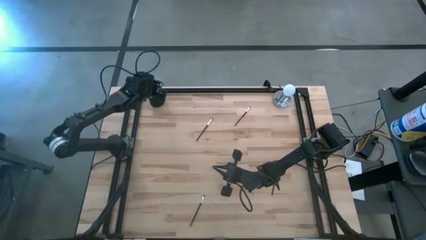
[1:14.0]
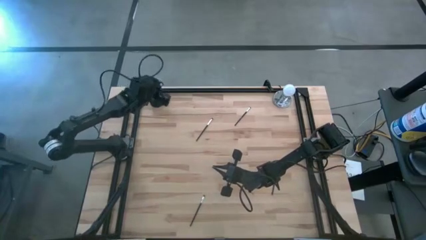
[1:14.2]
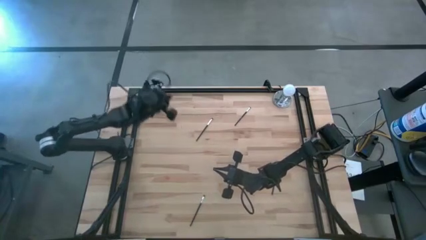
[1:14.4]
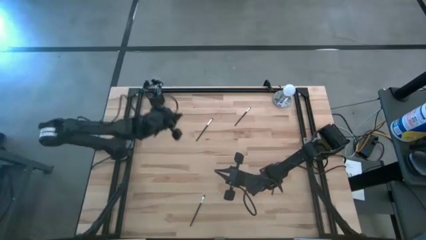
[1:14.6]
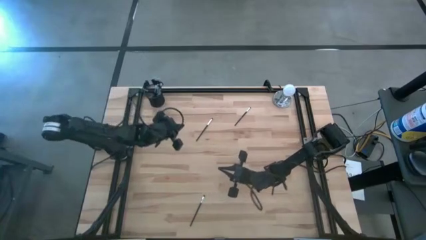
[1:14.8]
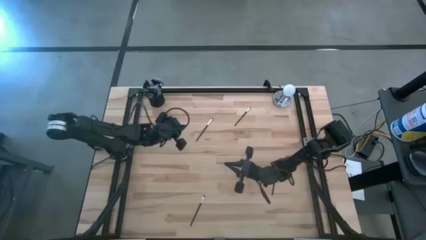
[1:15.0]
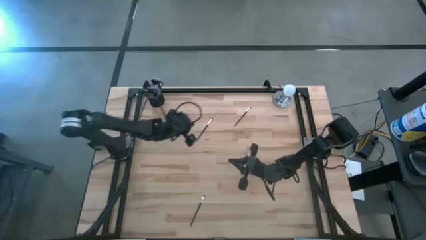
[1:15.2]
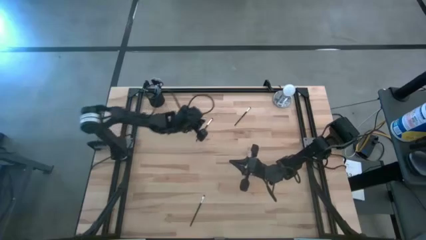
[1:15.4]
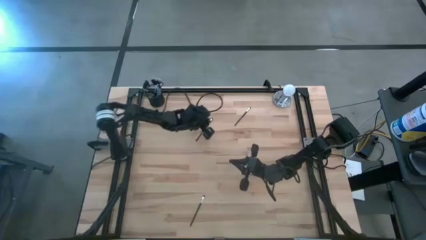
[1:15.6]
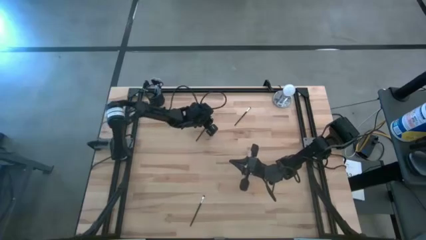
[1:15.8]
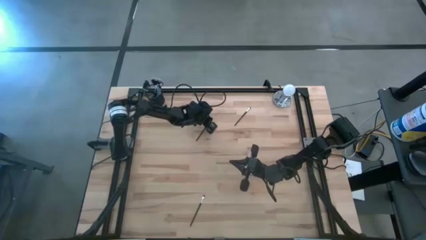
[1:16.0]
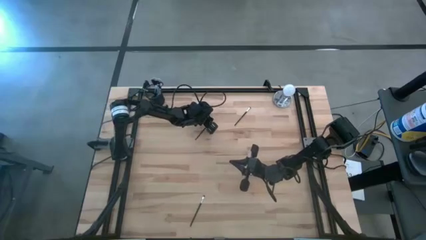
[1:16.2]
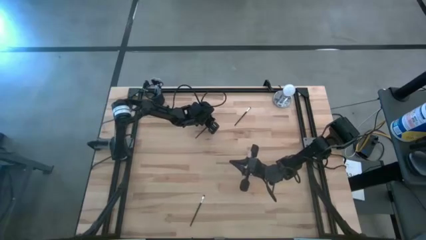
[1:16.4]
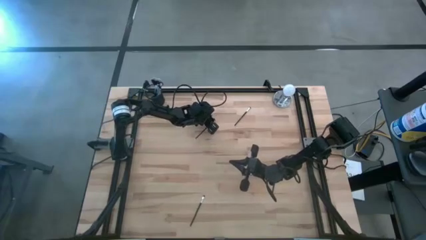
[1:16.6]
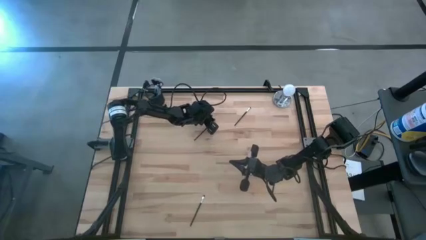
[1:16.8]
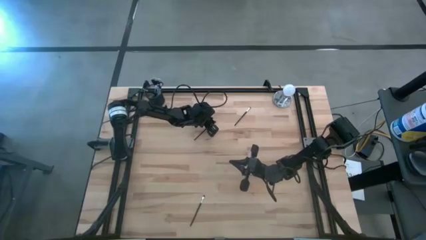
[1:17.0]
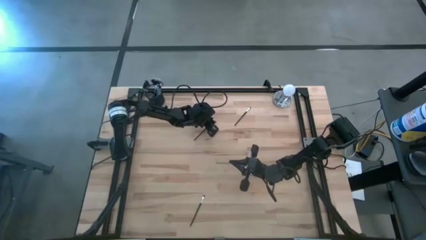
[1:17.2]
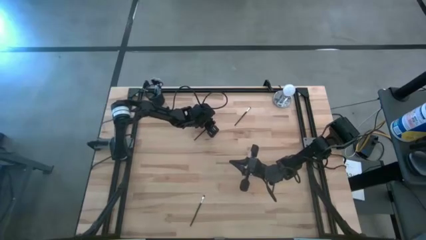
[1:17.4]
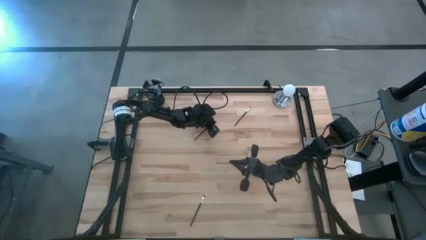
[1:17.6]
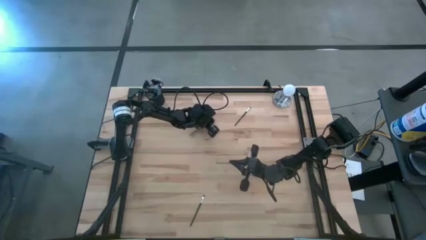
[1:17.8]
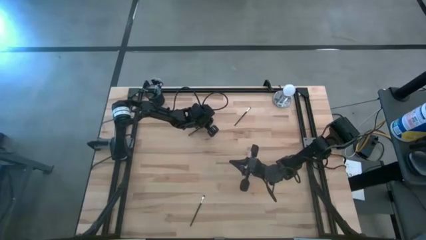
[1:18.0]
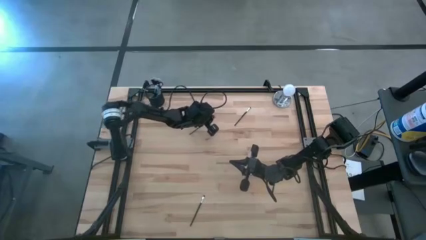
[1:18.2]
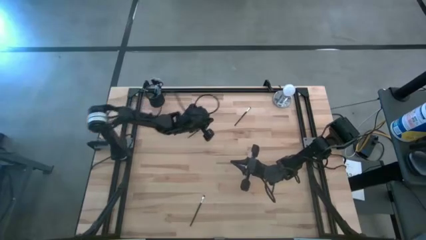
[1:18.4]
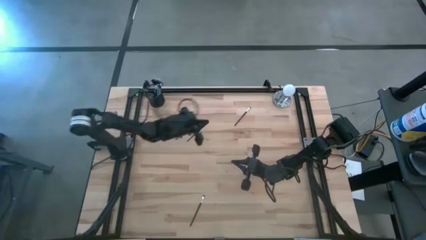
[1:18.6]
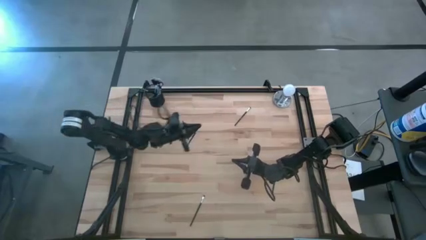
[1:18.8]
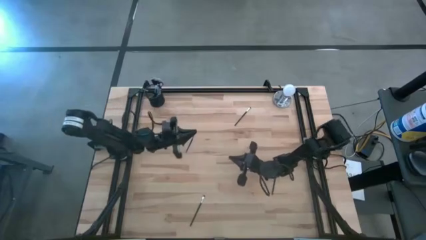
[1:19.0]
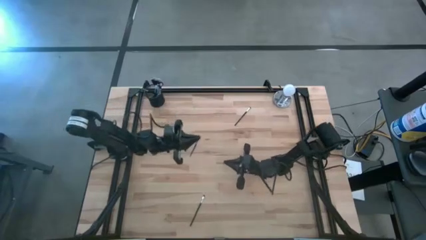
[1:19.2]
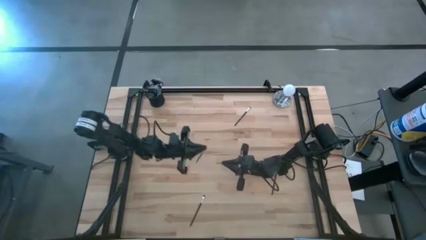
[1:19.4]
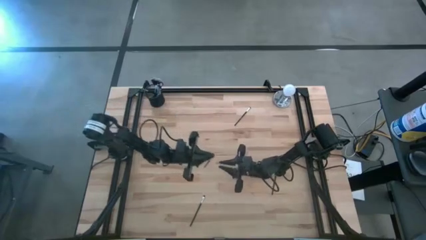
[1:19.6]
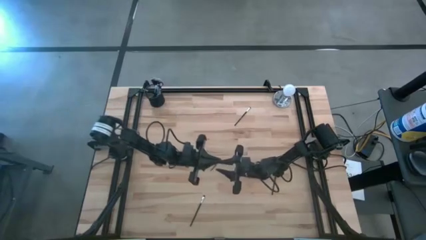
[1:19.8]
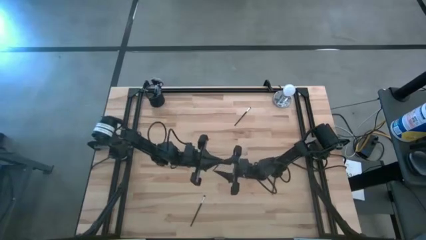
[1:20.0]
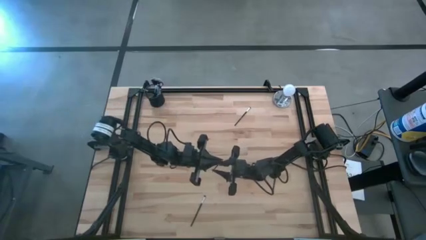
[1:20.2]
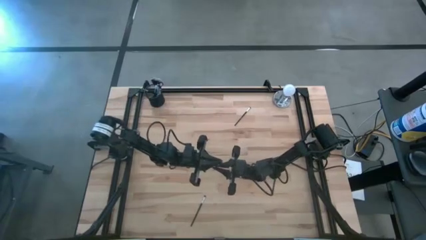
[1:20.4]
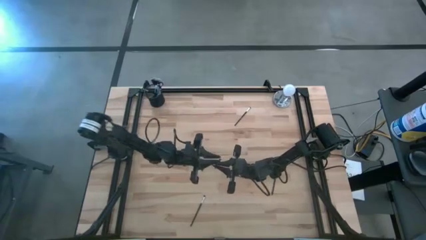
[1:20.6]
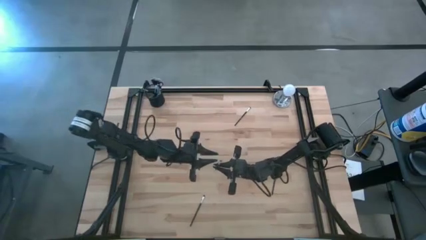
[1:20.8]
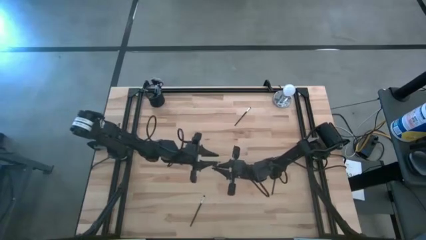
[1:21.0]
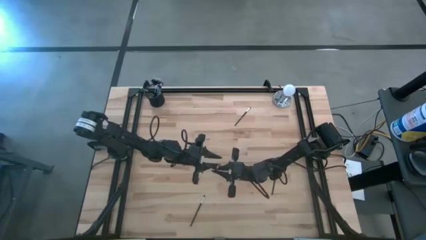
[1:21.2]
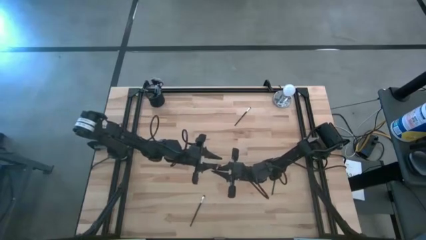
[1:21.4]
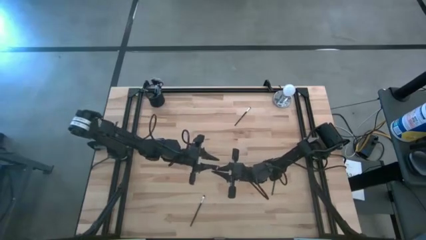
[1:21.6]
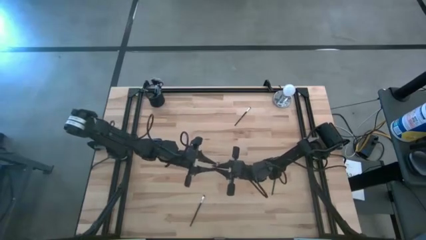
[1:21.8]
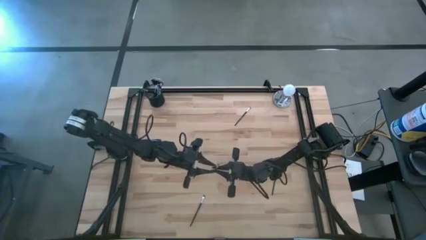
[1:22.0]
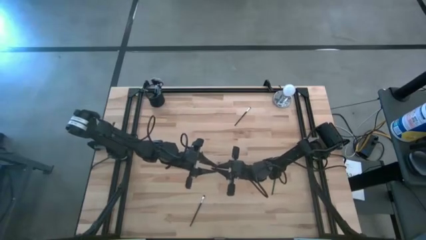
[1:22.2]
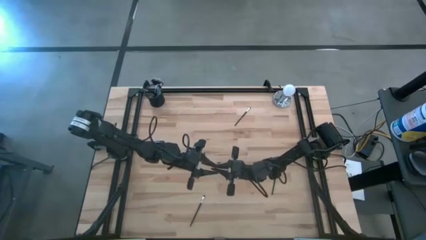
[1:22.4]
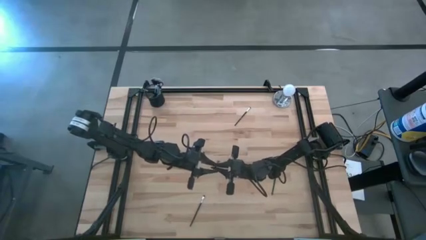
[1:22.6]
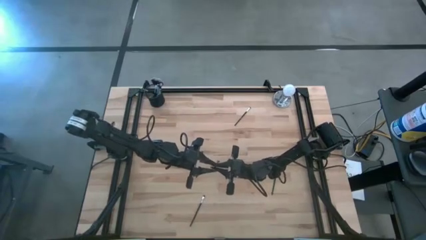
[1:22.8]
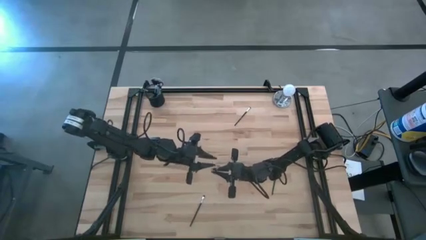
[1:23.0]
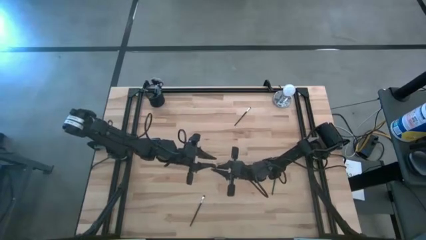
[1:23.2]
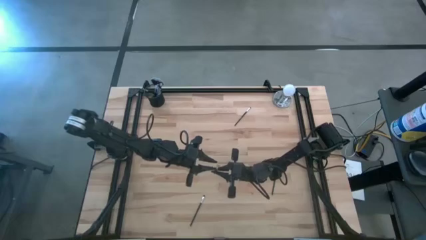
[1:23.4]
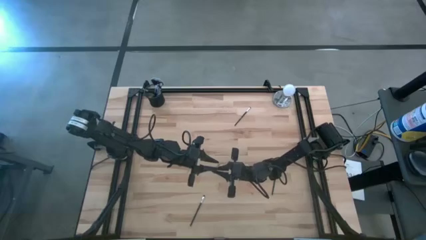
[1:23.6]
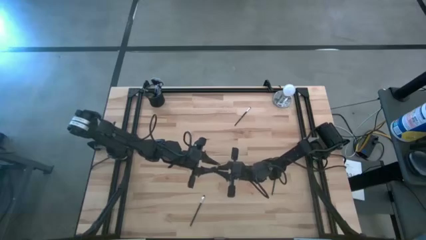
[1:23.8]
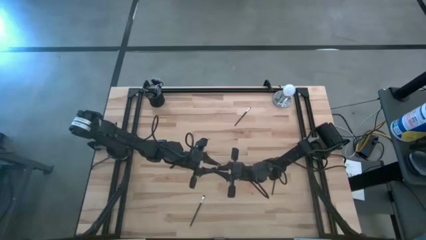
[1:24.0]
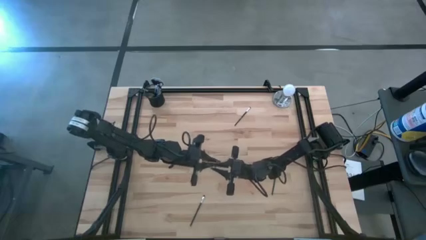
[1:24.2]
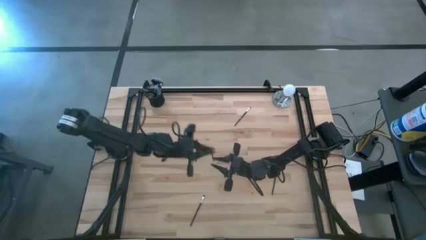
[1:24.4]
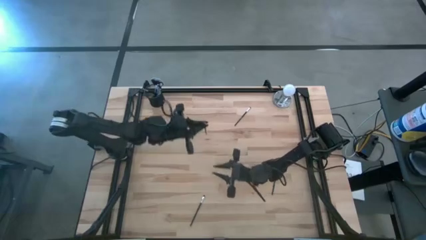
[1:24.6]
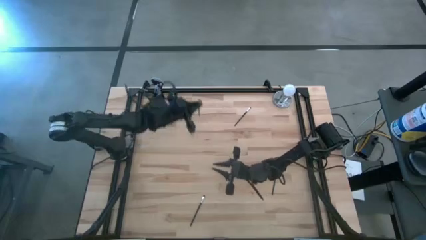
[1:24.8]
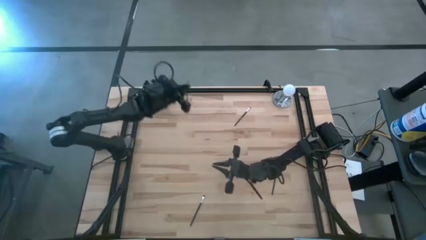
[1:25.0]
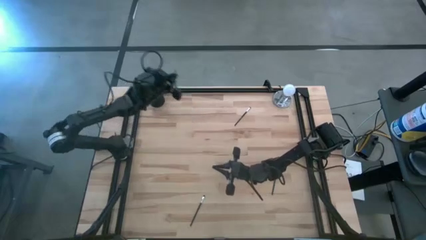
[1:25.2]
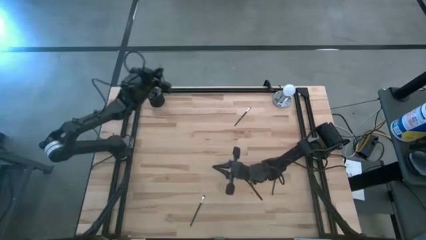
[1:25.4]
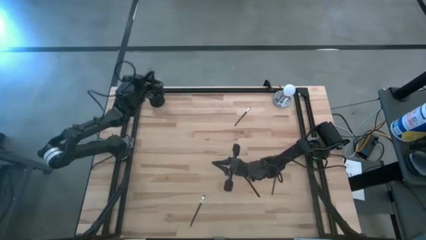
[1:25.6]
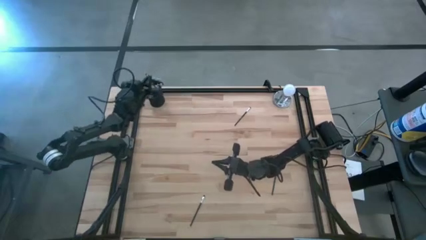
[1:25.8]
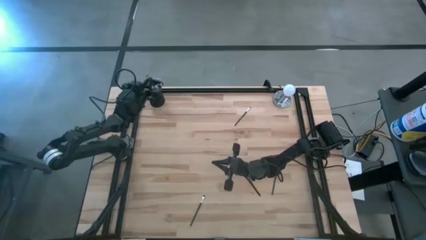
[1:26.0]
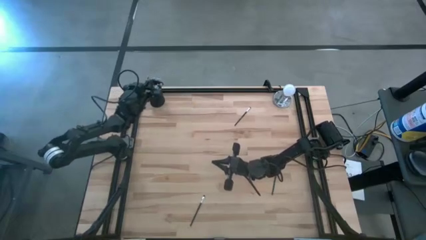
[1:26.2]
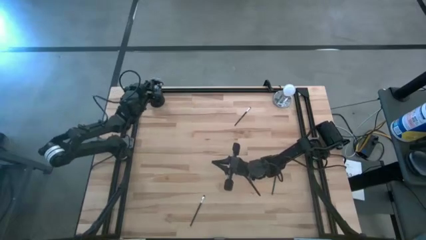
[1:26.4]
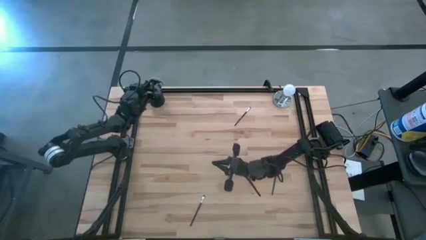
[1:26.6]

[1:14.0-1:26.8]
Task: Pick & Place Makeup Supplies
Put the makeup brush into the makeup holder

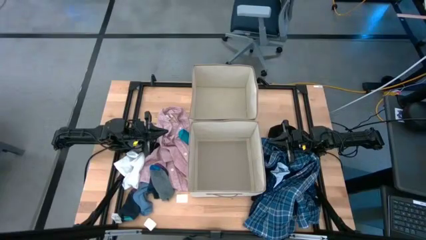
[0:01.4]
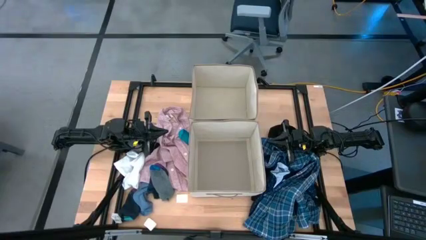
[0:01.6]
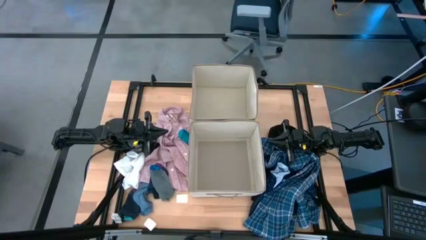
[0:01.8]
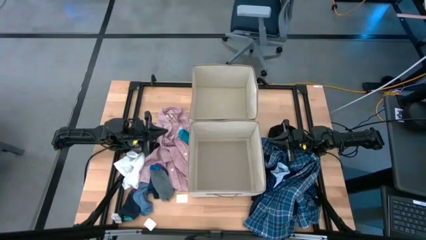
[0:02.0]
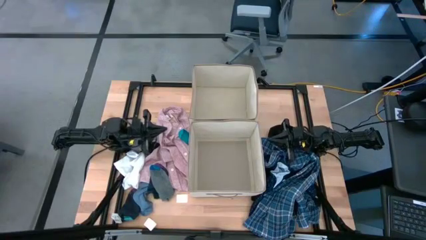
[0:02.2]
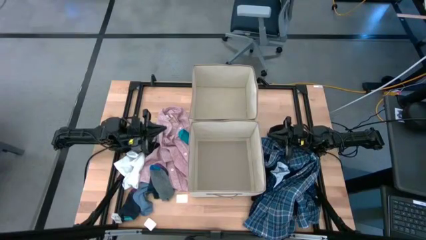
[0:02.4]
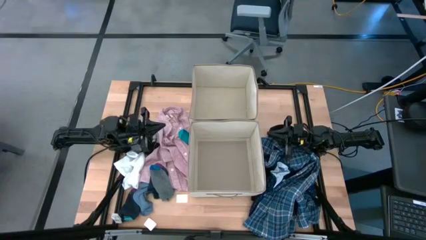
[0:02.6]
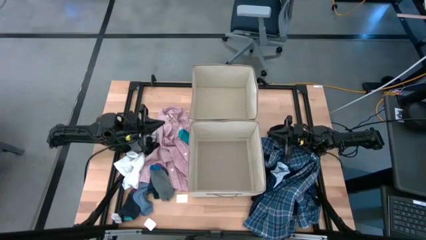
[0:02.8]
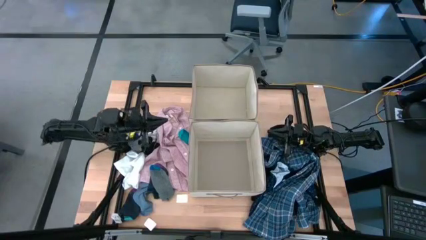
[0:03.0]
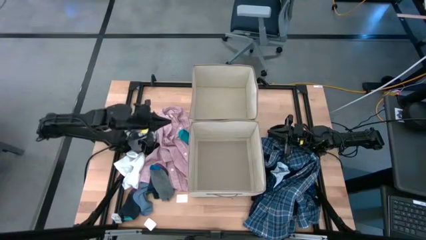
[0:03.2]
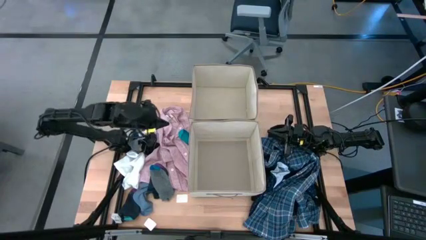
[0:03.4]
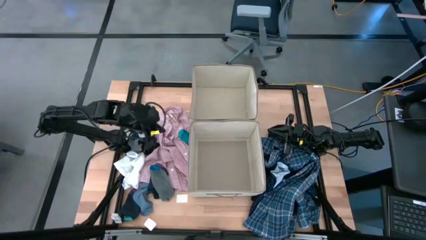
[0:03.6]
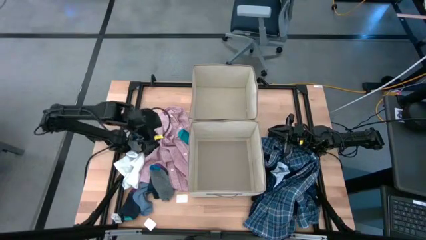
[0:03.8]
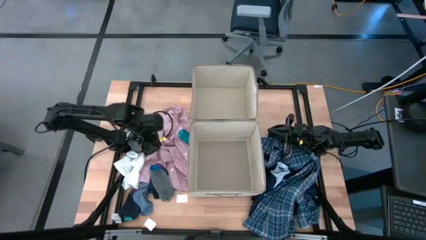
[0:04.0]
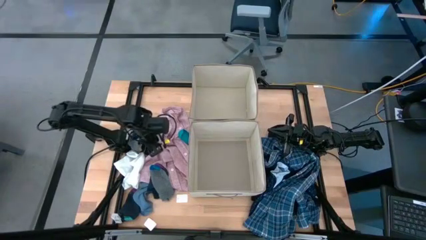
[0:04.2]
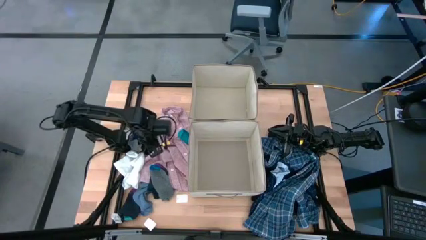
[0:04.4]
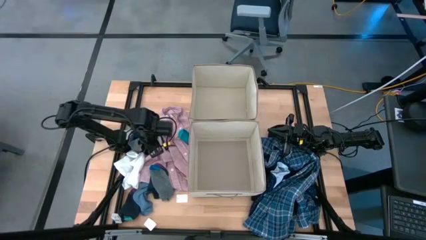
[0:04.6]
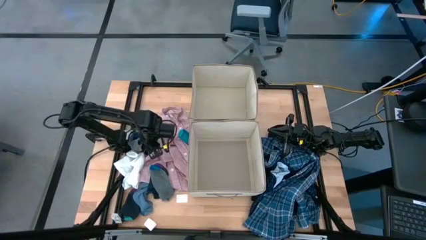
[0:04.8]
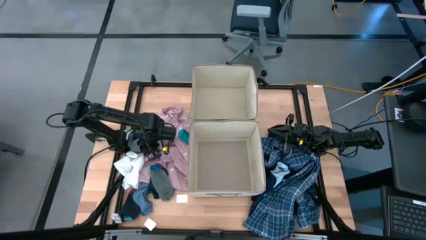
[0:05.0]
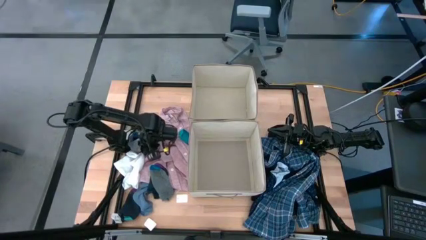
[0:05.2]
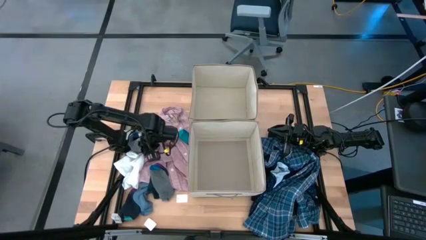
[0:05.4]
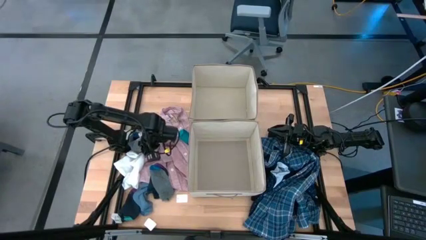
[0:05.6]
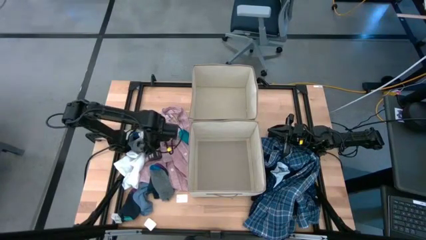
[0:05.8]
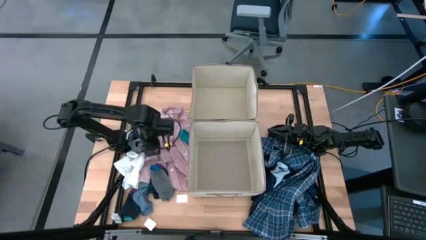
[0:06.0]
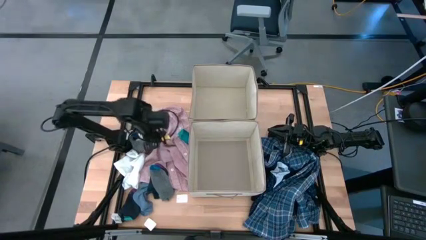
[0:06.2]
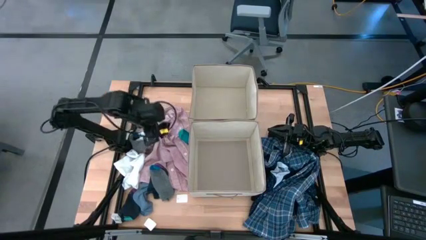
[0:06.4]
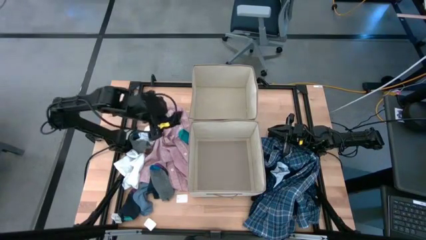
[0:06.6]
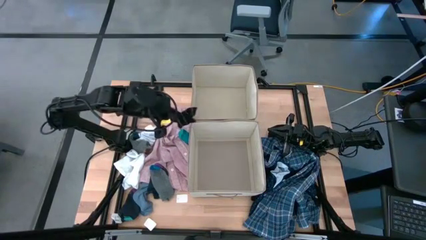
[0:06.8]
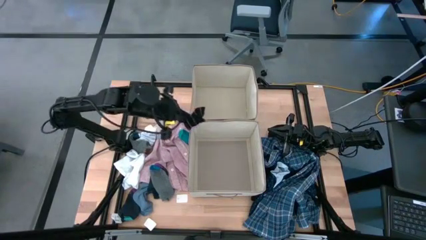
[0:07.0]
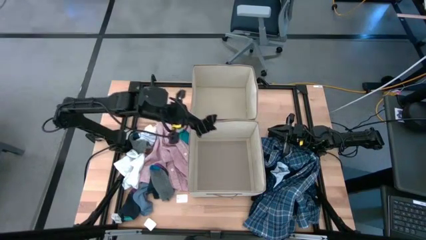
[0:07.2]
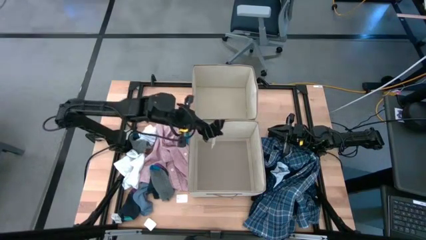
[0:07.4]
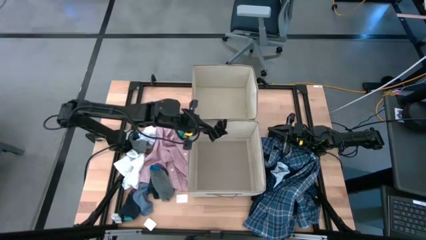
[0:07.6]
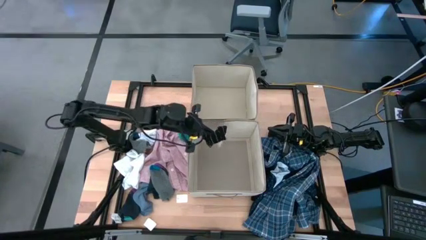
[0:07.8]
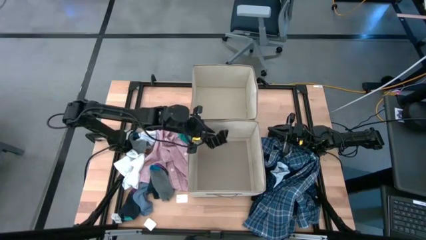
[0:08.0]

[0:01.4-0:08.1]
Task: Sort clothes
Put the black sock into the bottom laundry organizer
